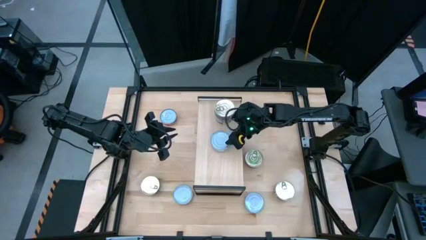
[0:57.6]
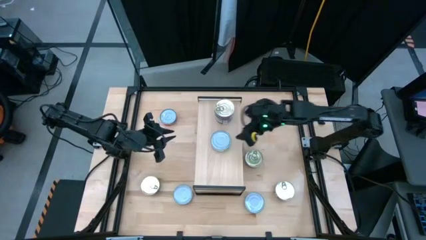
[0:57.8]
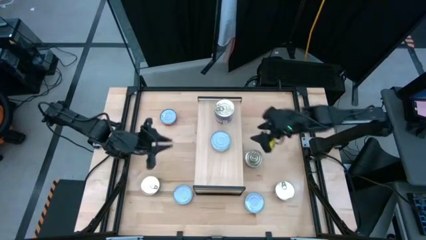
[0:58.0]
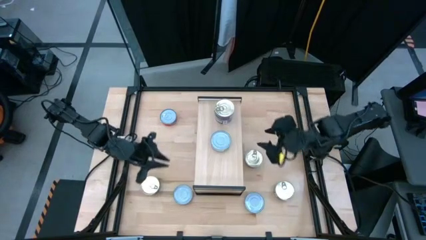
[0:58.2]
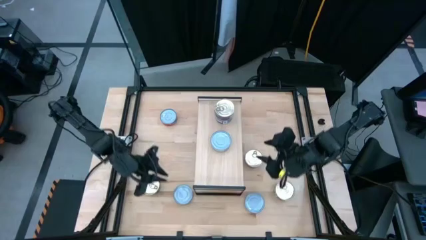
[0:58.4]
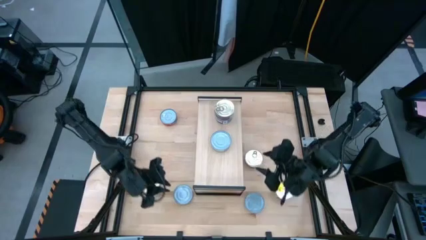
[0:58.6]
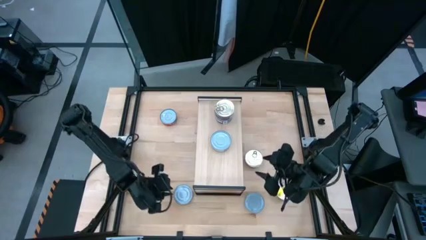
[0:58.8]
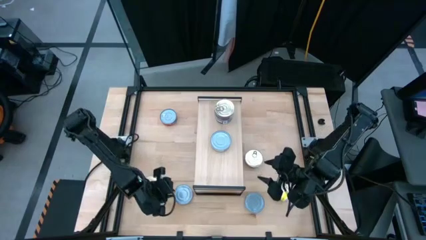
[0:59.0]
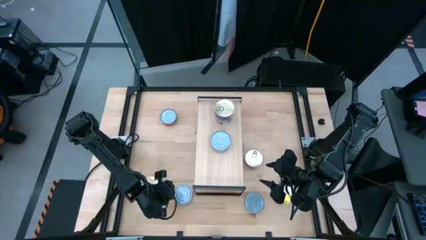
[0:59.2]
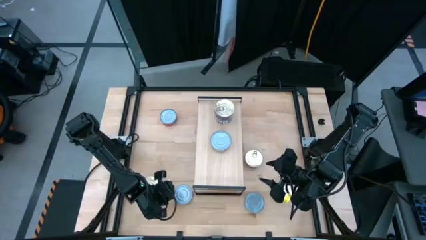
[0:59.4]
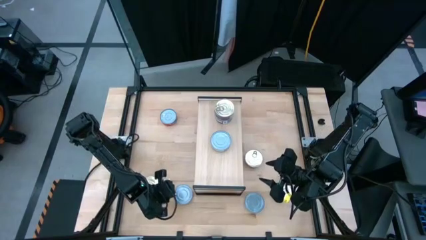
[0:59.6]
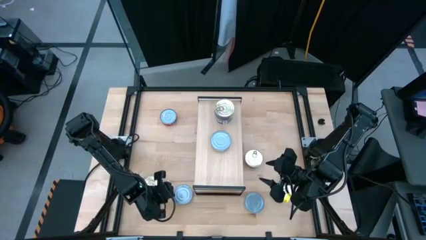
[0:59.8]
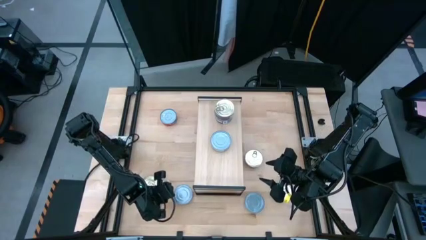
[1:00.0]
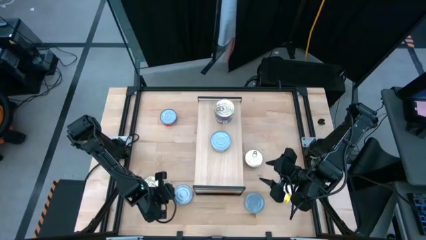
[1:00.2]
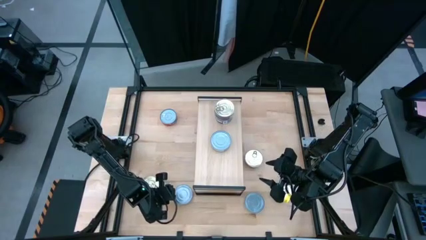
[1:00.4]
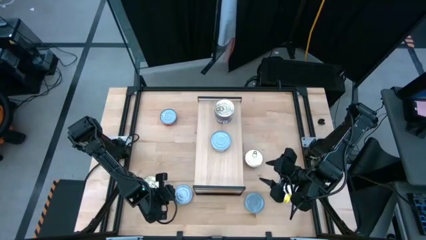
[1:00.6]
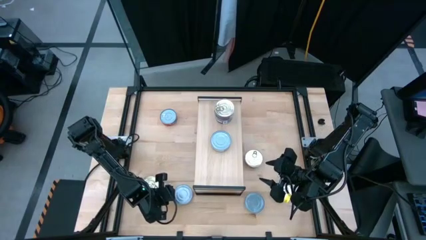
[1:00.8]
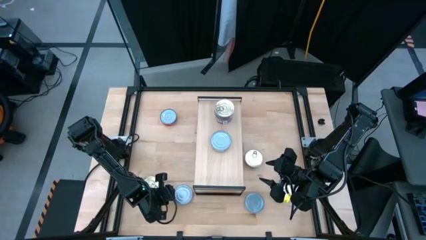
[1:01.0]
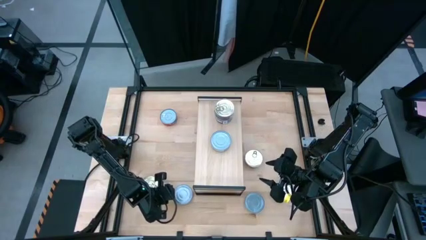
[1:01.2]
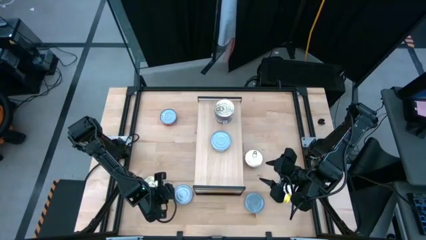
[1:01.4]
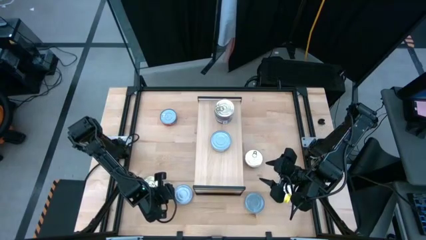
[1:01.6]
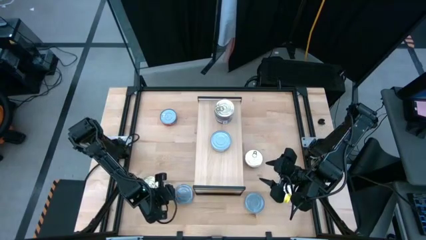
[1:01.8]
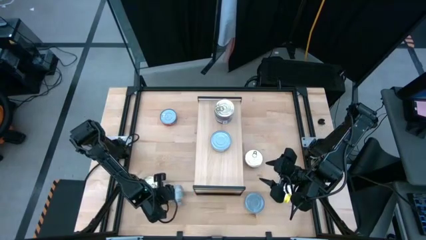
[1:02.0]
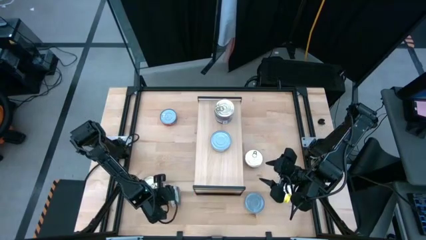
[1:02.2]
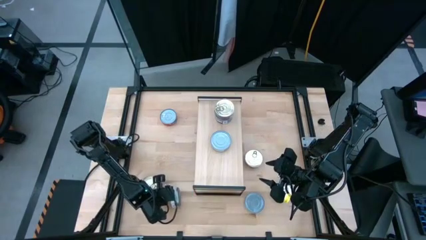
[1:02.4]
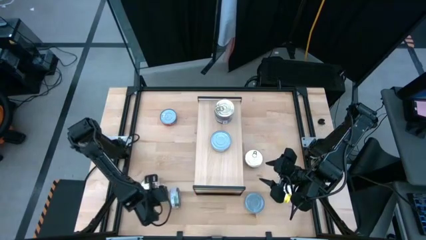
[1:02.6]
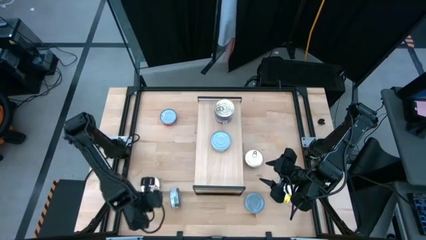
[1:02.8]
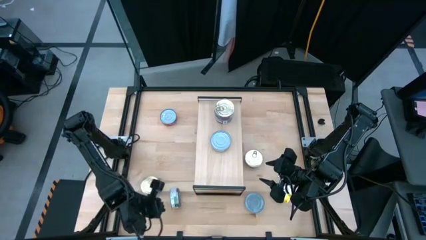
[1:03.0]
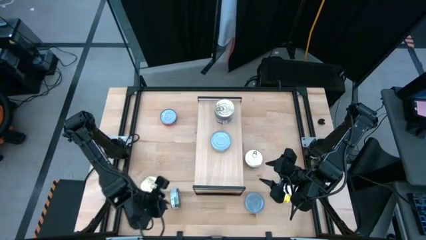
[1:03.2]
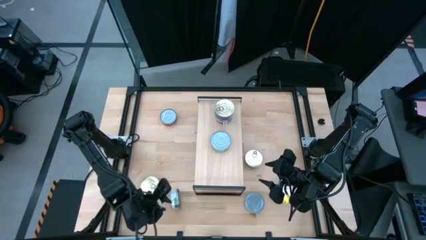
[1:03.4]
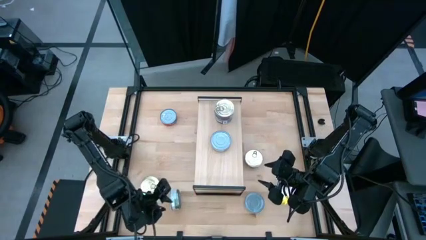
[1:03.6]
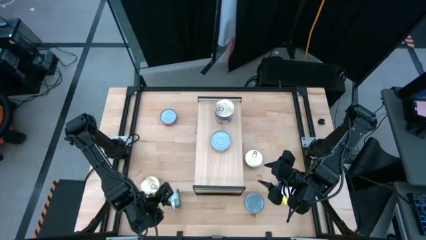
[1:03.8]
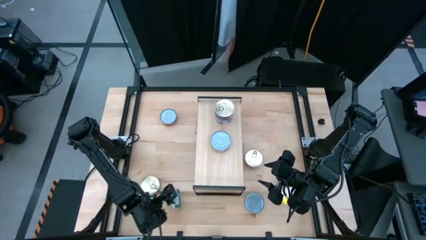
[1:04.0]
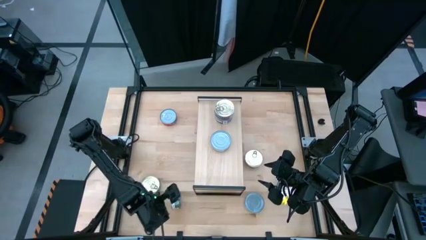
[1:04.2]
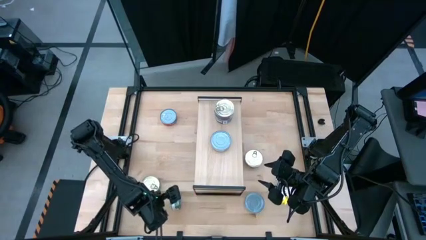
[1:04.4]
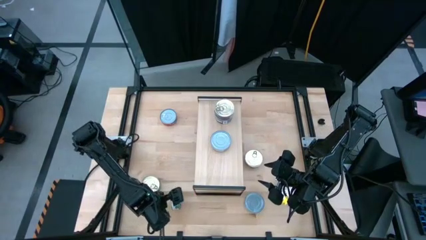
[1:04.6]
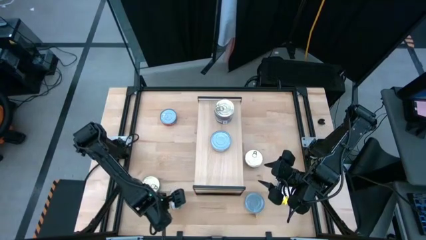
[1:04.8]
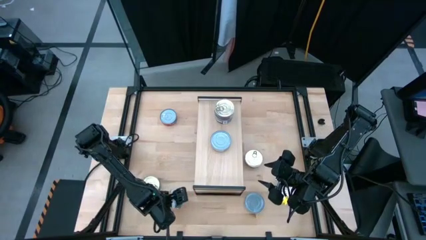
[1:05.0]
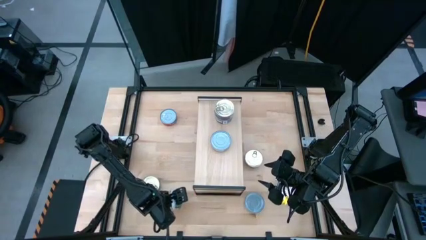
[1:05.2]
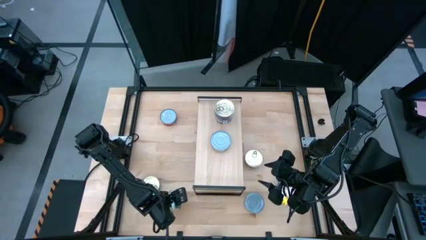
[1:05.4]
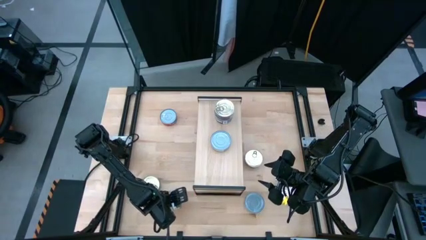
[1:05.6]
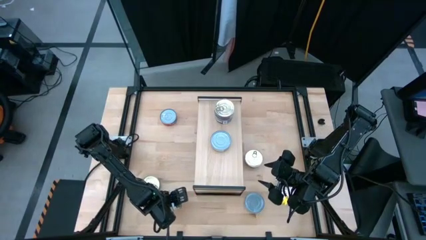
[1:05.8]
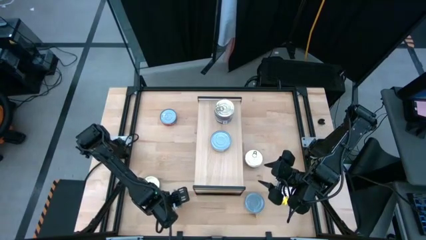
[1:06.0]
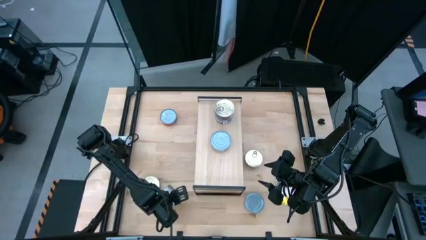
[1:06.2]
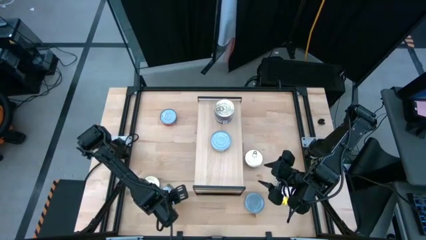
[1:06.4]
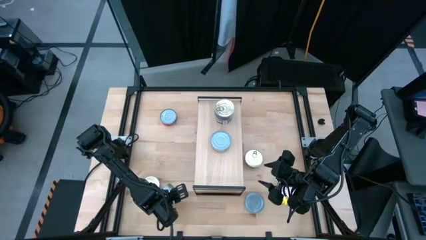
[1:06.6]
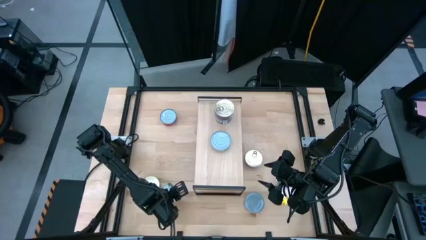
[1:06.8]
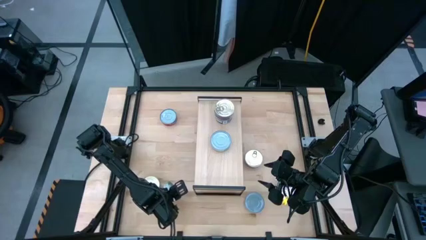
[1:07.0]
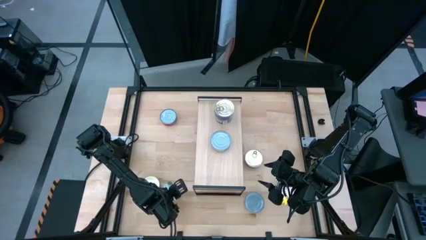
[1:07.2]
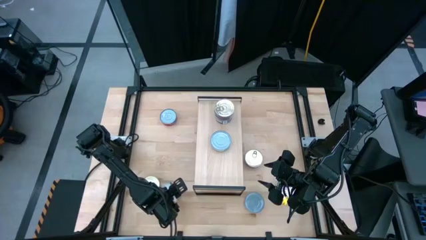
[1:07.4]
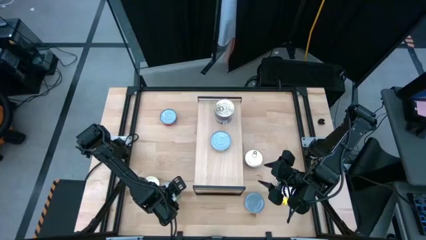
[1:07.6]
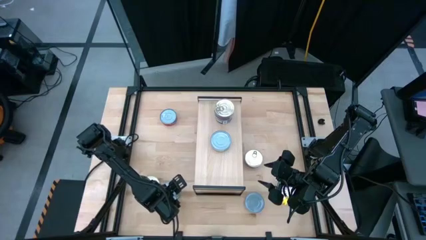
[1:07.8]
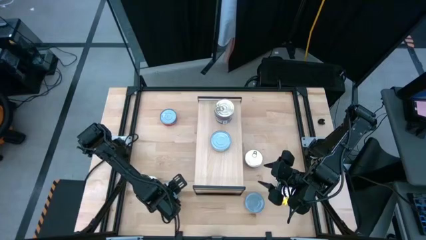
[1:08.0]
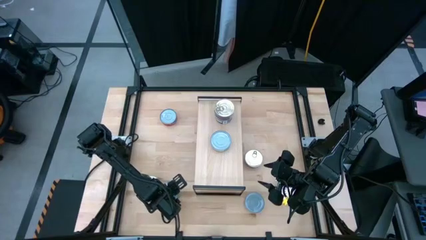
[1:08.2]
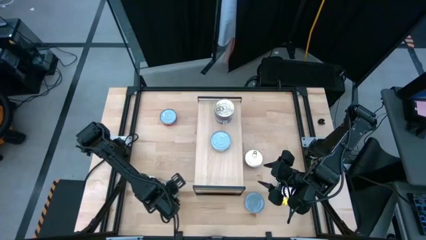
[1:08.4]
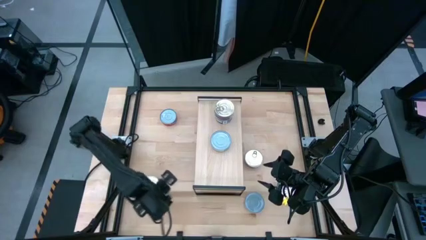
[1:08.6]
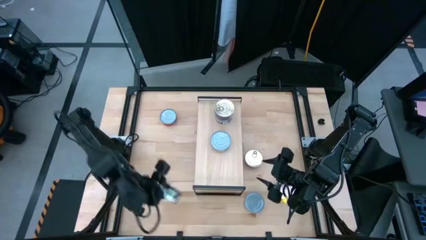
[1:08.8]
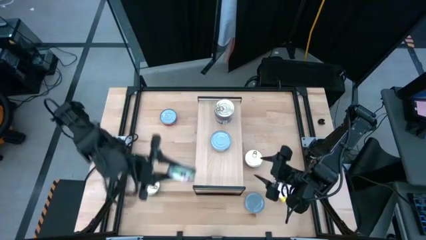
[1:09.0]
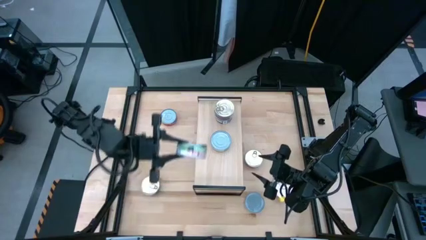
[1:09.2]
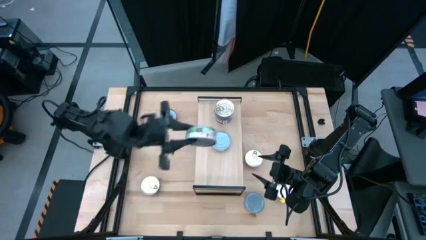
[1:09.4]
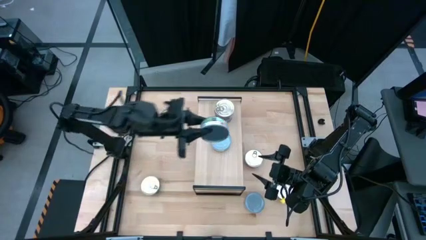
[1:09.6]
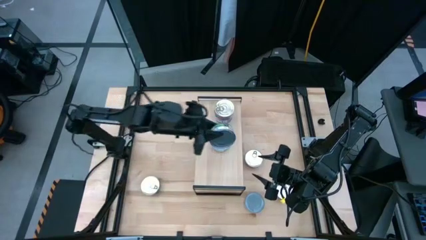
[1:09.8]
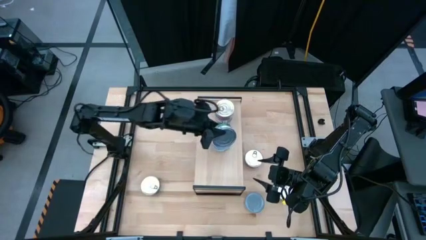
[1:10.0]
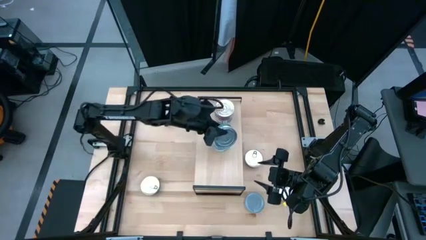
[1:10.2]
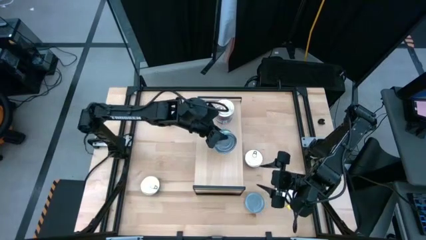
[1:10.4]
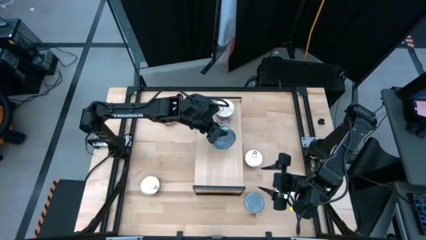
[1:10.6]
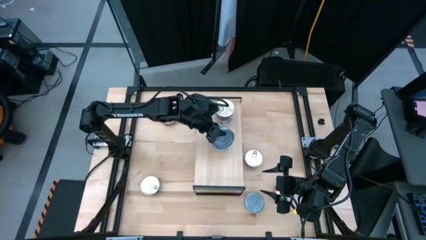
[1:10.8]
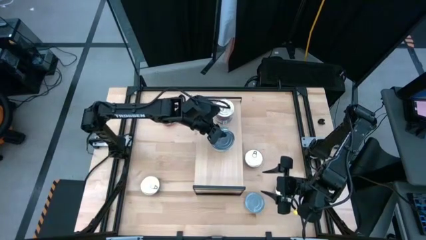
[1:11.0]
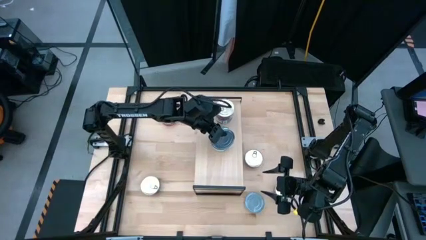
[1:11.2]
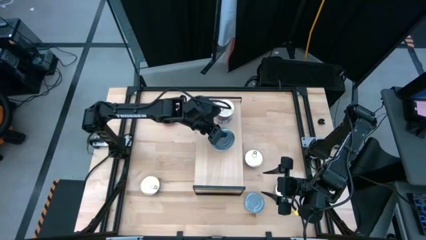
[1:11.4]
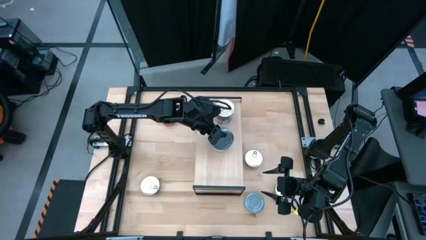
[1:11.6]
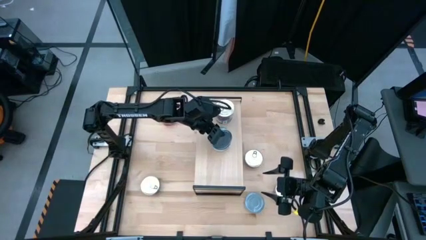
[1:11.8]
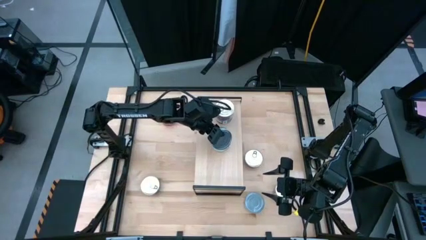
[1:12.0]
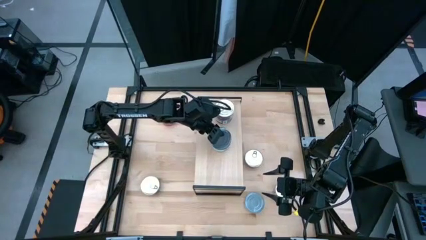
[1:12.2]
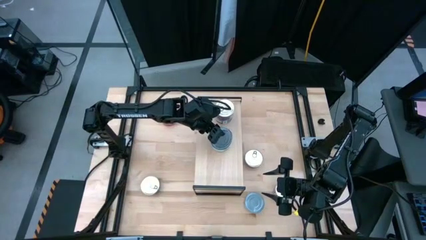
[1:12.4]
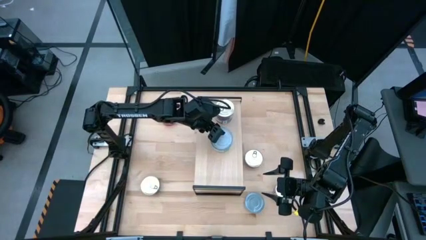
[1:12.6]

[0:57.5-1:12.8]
Task: Stack canned seafood by type on shelf
Stack the green white soda can on the shelf

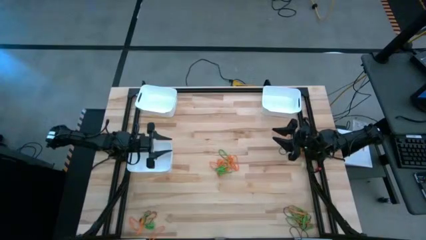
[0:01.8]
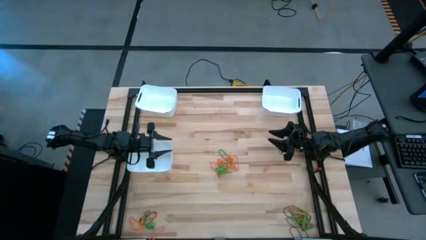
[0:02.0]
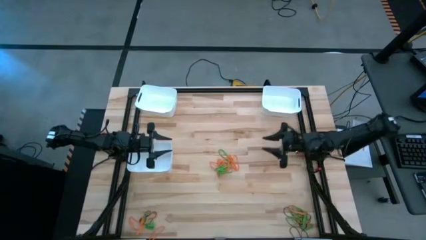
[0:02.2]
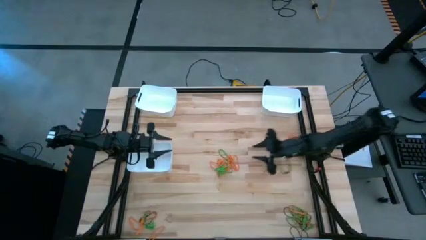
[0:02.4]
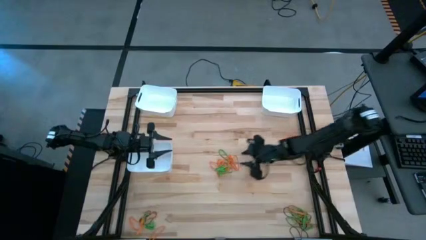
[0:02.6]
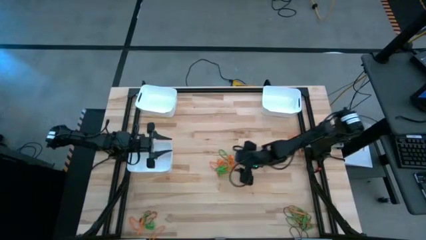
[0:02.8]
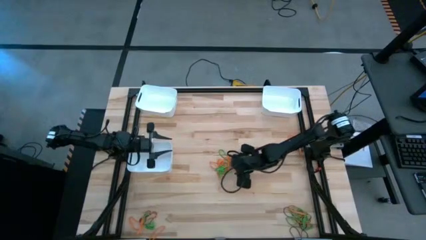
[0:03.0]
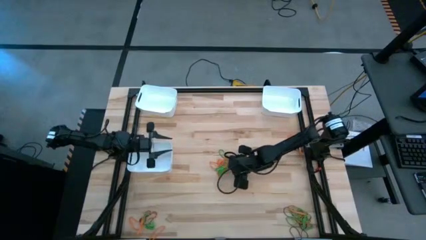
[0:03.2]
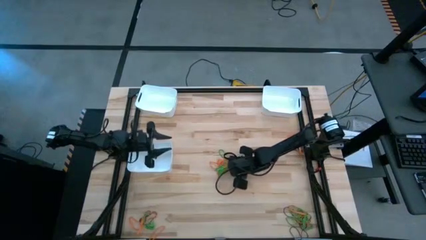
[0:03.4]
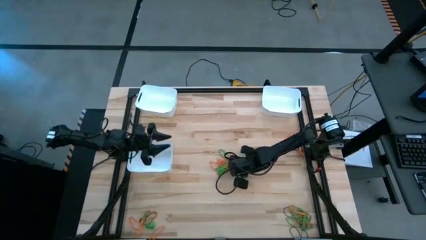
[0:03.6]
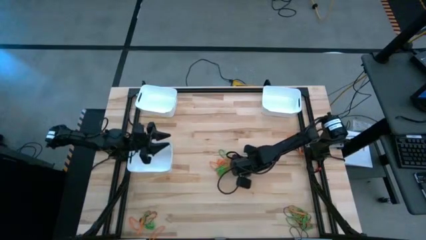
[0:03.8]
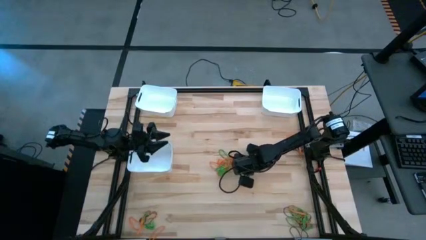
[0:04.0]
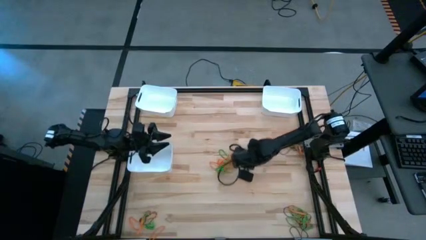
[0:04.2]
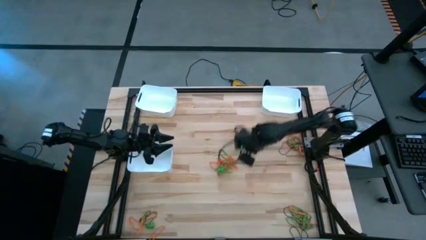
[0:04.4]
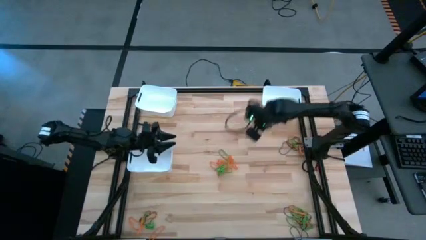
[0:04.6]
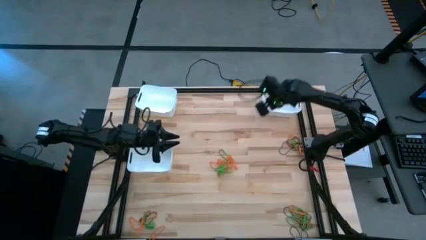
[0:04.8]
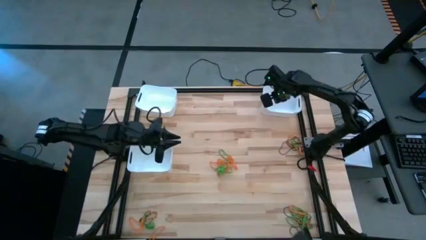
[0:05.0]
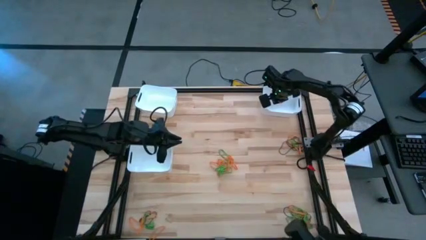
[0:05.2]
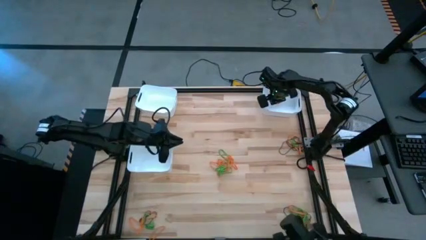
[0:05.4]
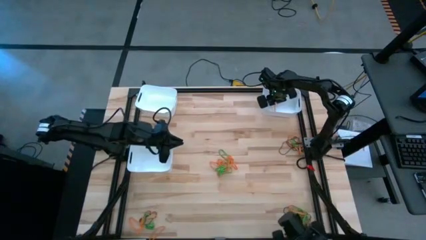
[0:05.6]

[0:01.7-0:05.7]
Task: Sort rubber bands into baskets
Put the orange rubber band into the top right white bin
